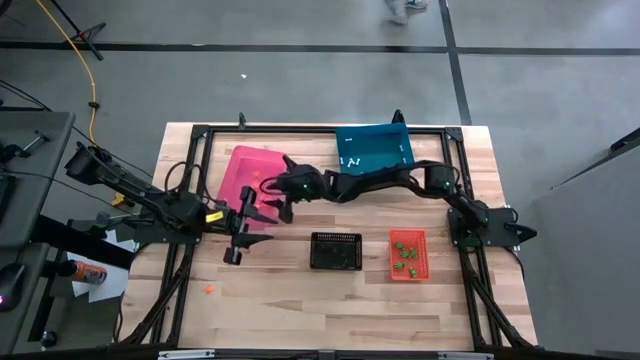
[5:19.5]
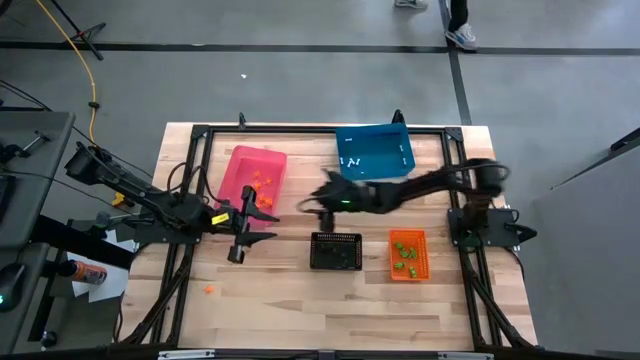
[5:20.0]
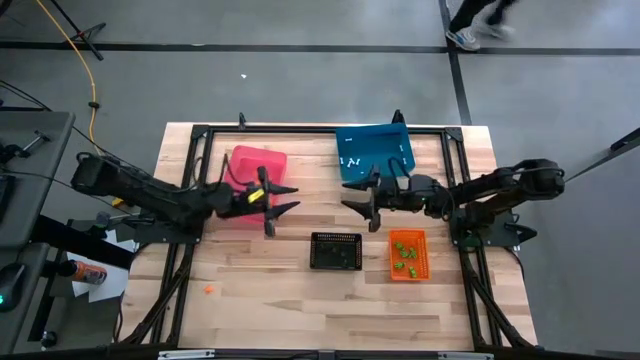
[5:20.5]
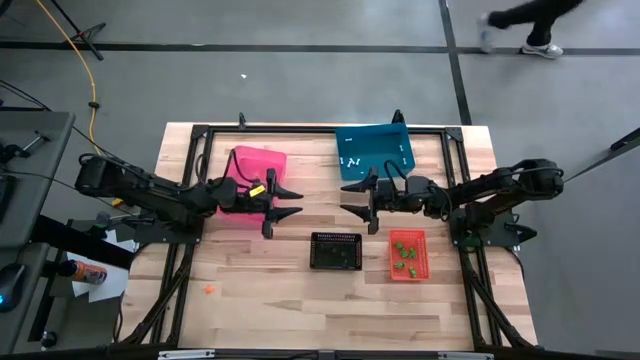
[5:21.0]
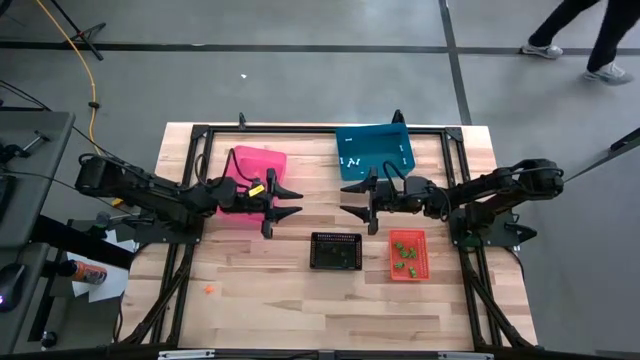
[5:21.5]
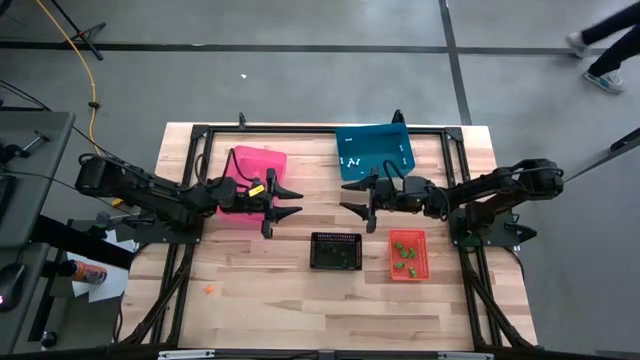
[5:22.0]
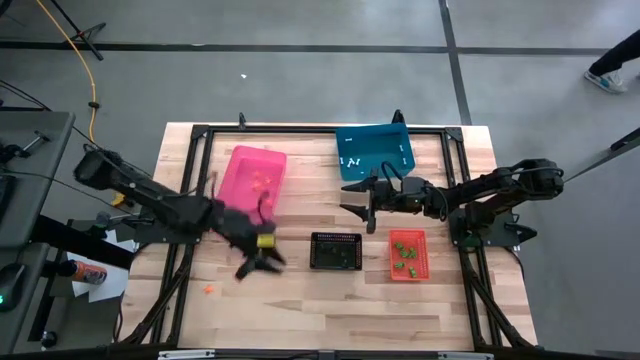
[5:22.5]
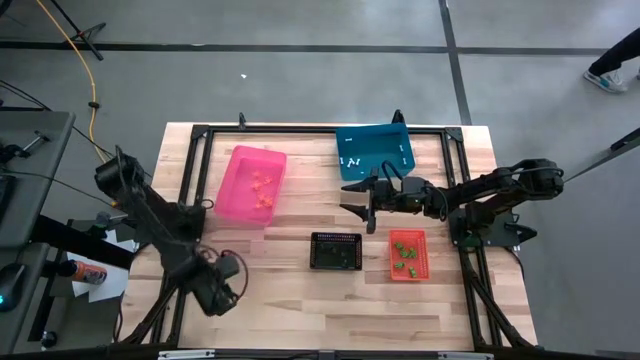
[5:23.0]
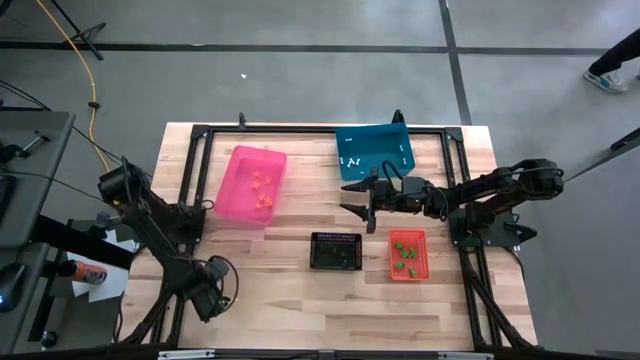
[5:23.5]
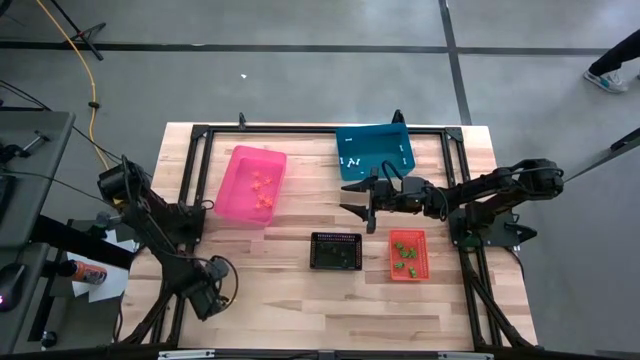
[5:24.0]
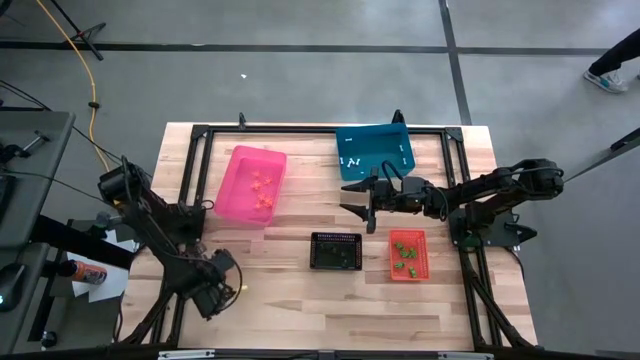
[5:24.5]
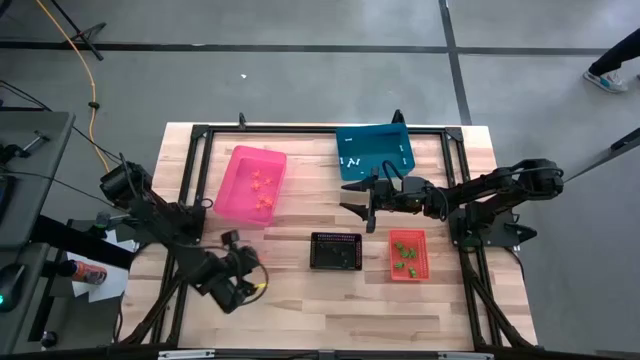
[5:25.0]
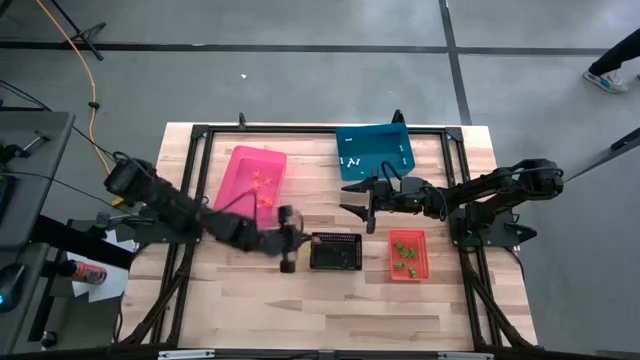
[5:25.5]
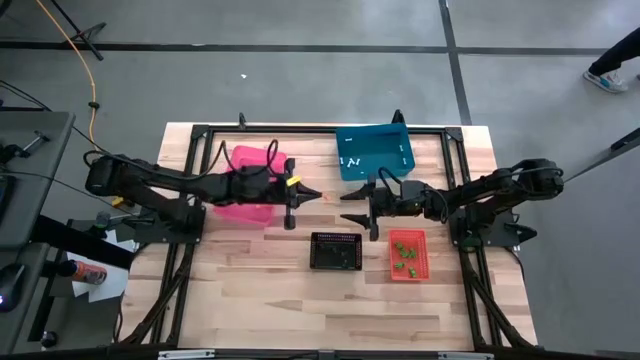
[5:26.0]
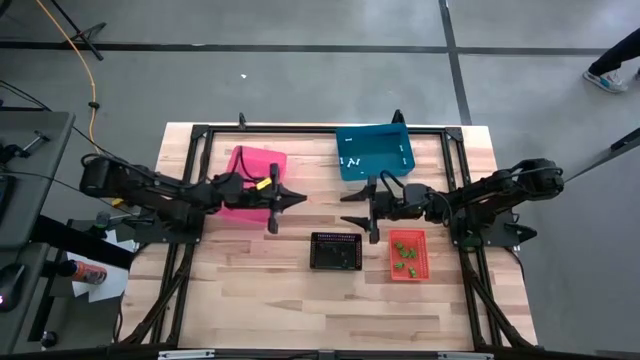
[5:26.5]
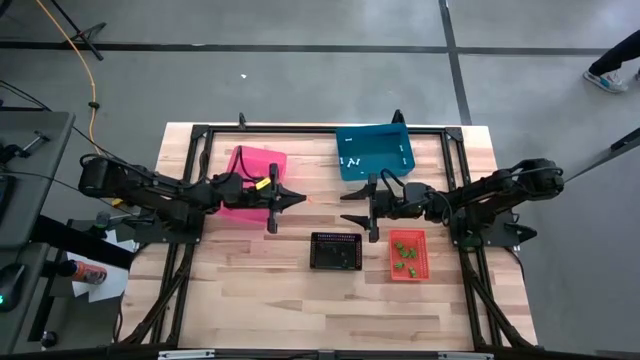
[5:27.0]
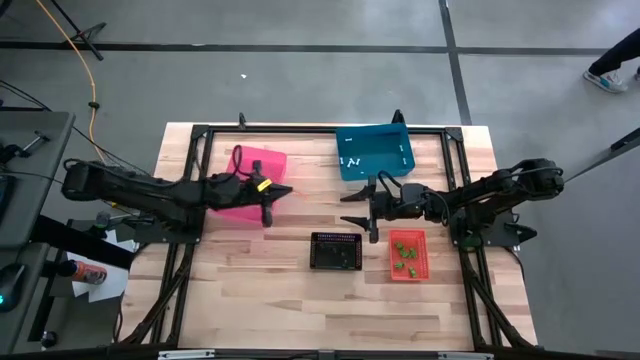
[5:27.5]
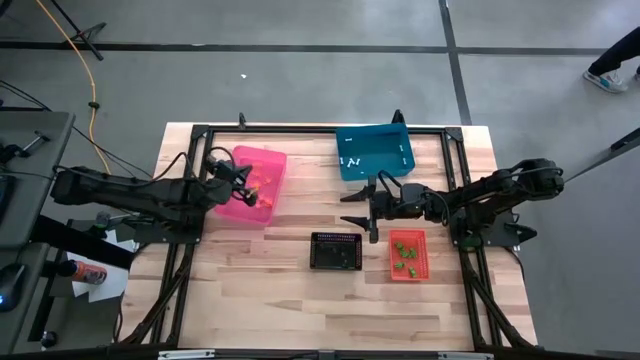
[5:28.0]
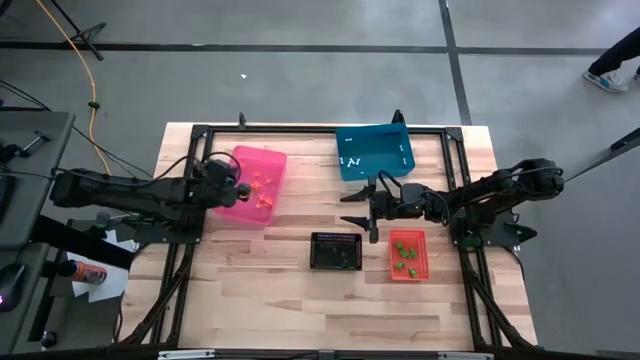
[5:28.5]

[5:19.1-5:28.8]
Task: Sort Halloween decoration
Put the orange spider toy into the pink bin

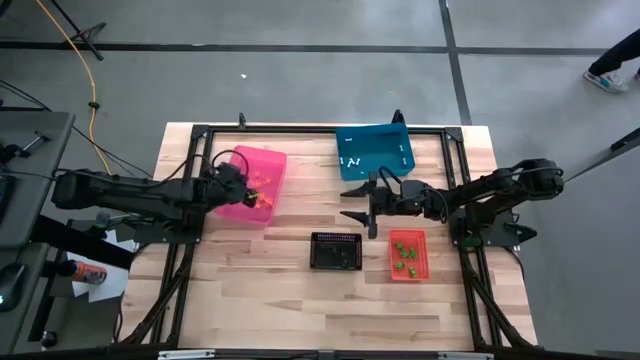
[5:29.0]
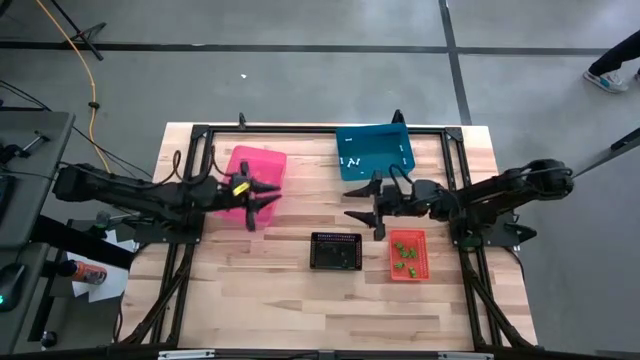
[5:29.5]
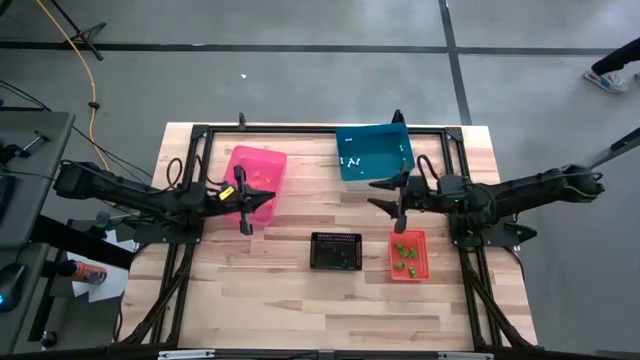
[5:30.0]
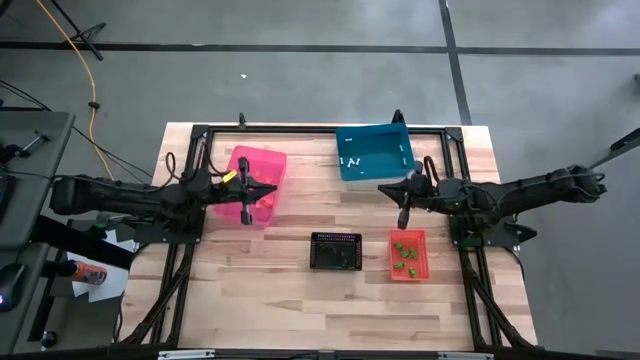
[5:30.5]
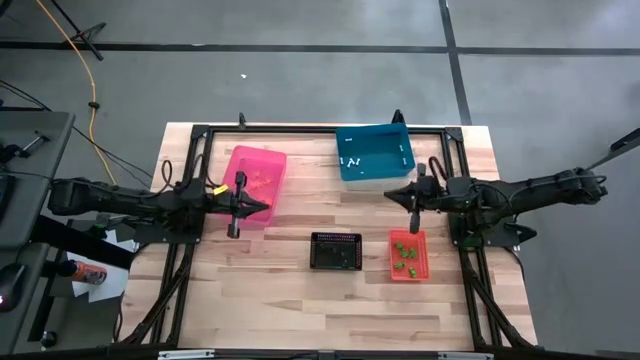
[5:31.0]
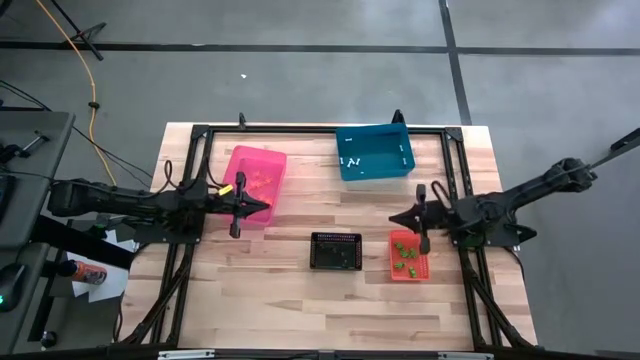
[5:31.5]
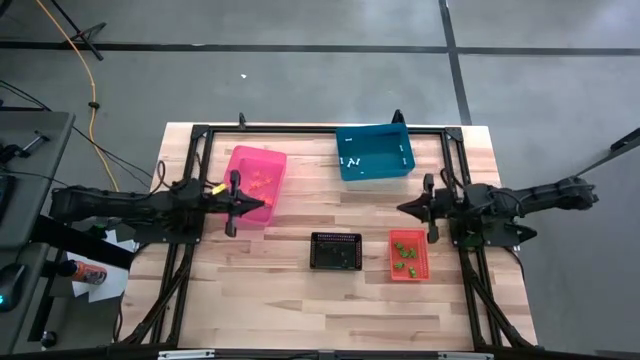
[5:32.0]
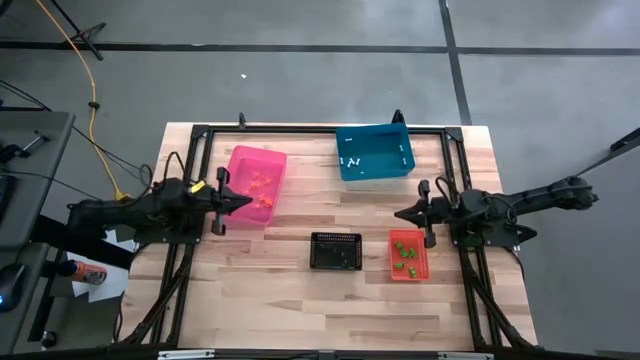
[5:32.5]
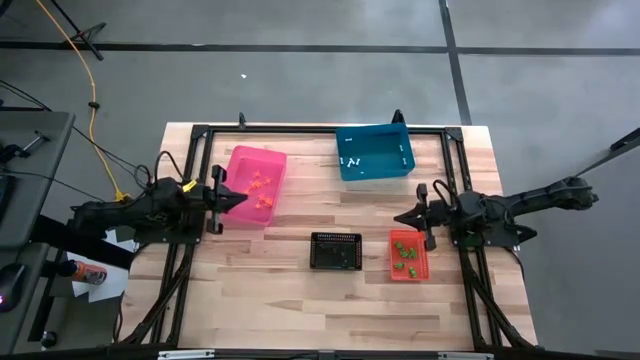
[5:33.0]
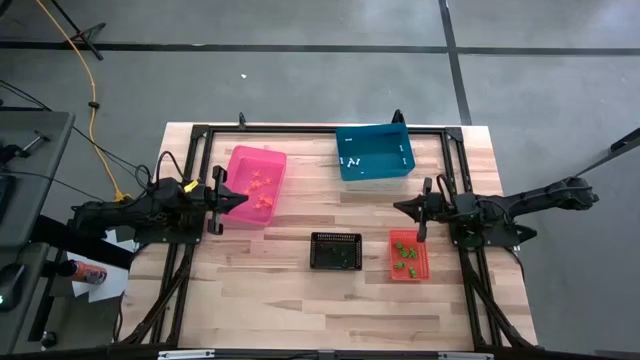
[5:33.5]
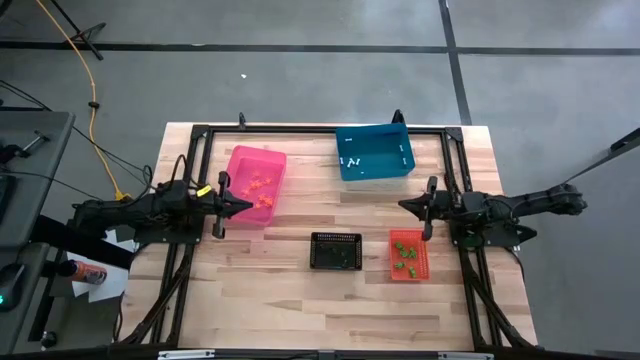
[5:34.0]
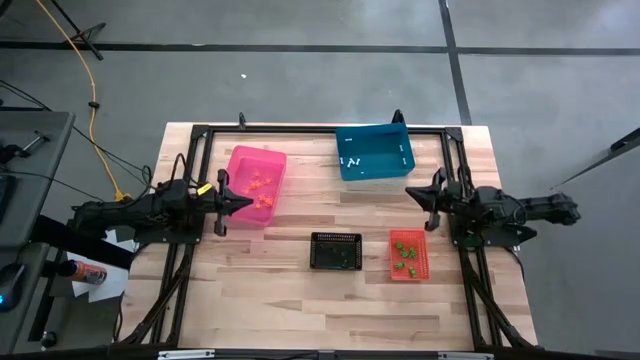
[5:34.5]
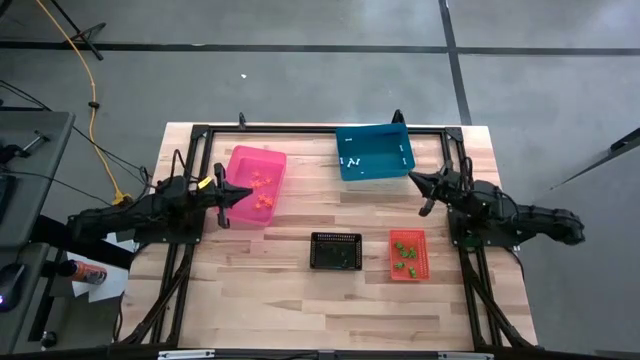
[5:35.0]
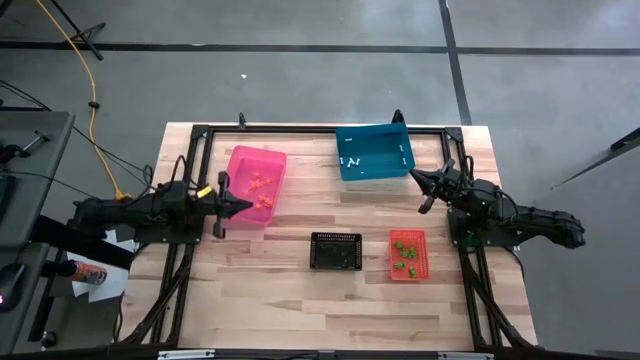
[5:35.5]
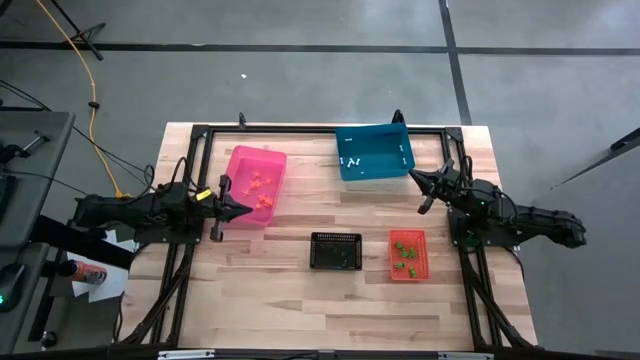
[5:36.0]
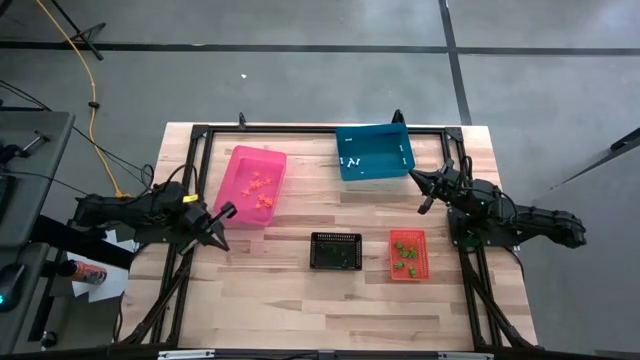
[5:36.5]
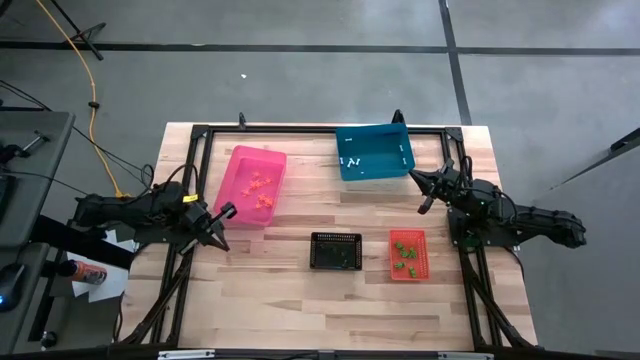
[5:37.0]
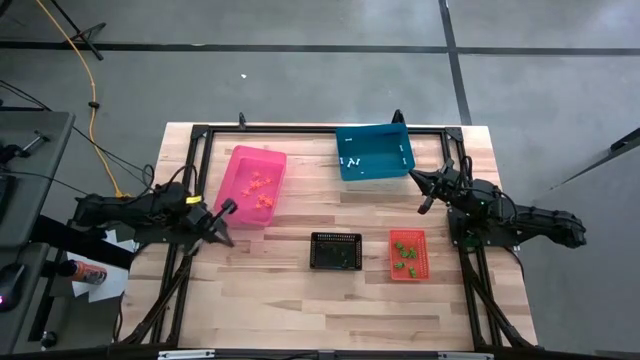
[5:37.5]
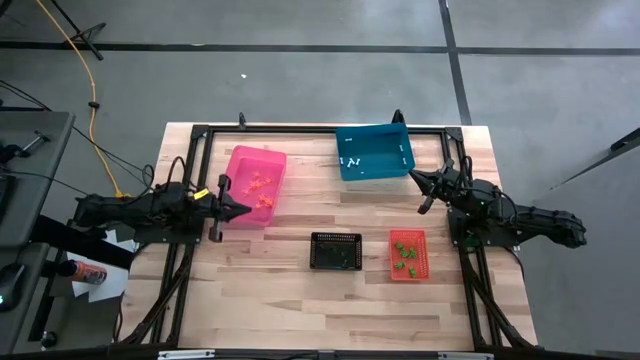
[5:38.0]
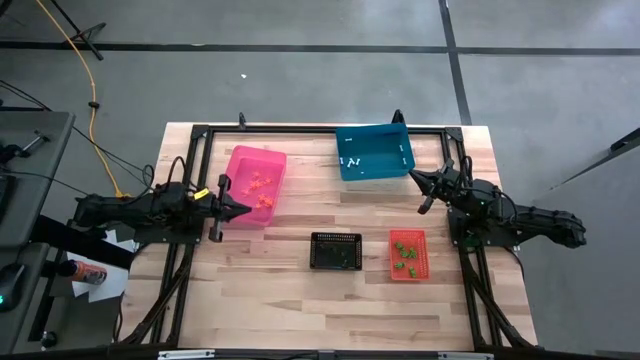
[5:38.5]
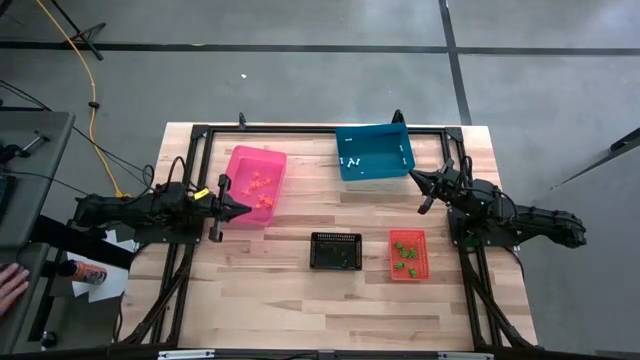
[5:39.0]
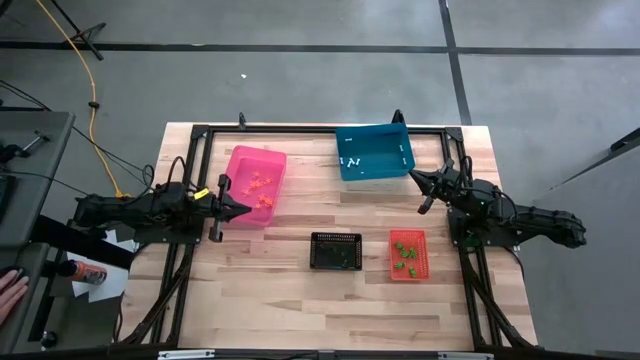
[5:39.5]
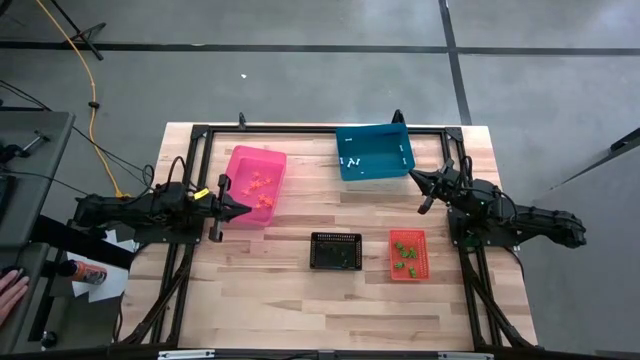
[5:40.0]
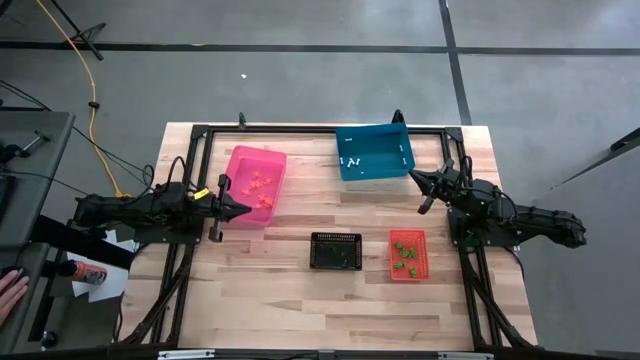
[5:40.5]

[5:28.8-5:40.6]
Return to Home Position

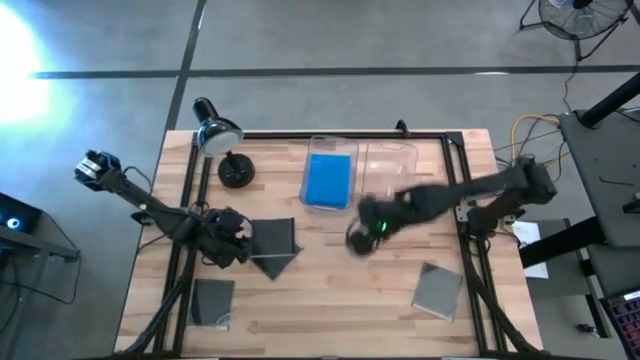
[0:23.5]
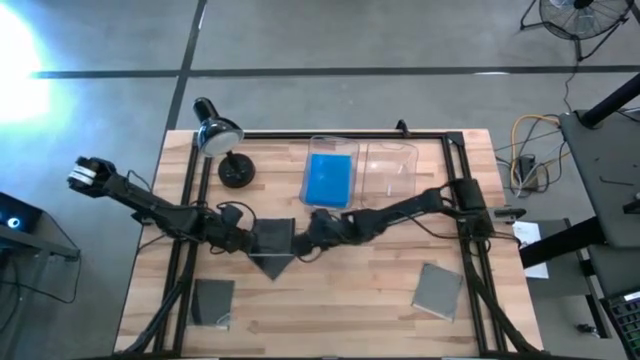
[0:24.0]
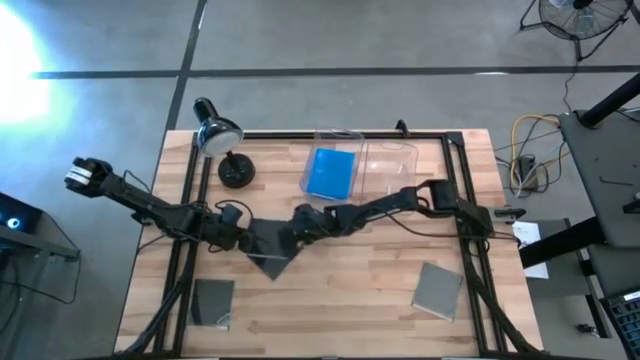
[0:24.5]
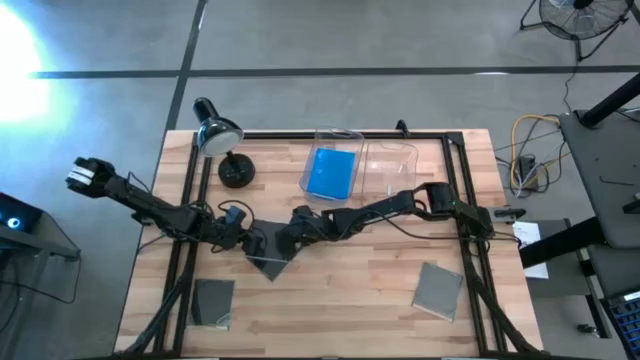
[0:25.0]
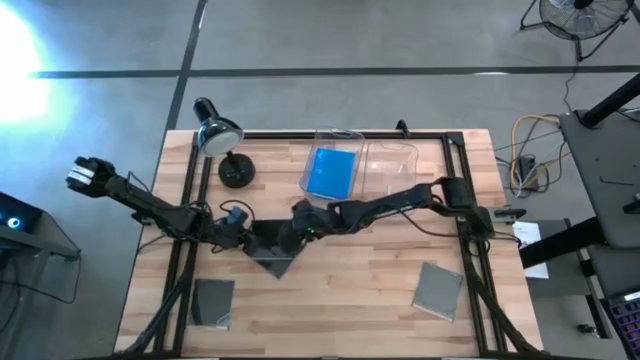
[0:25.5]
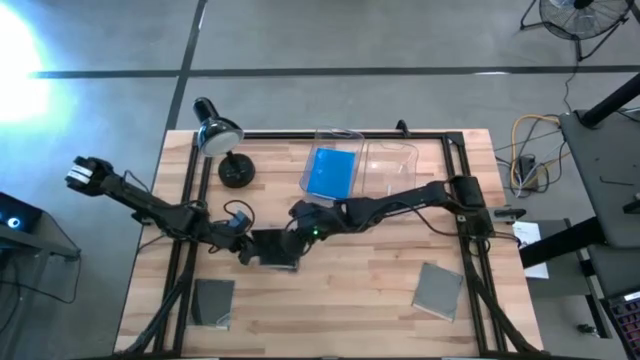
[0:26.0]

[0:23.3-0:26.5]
Task: Pick & place jewel cases by type
Put the black CD case into the right transparent bin
